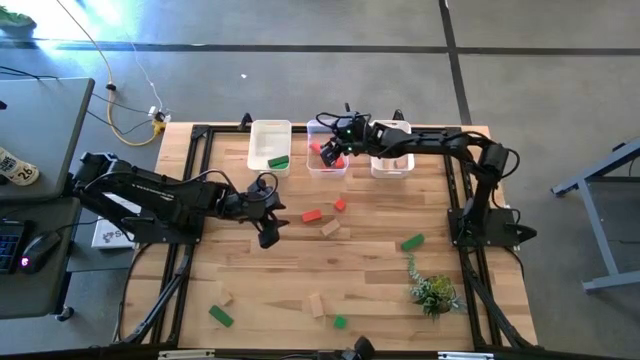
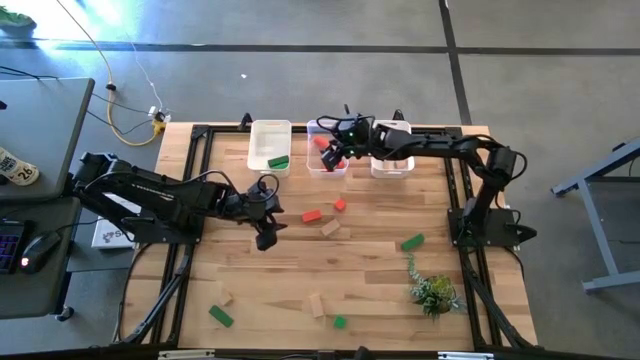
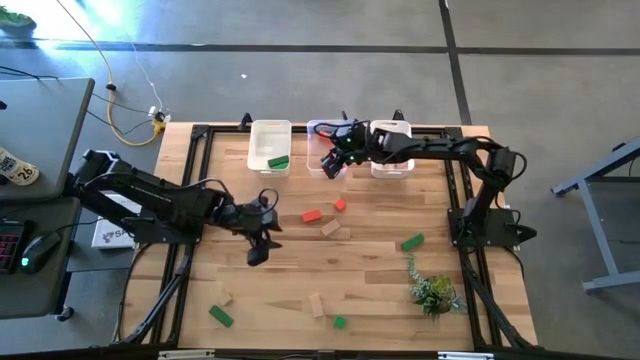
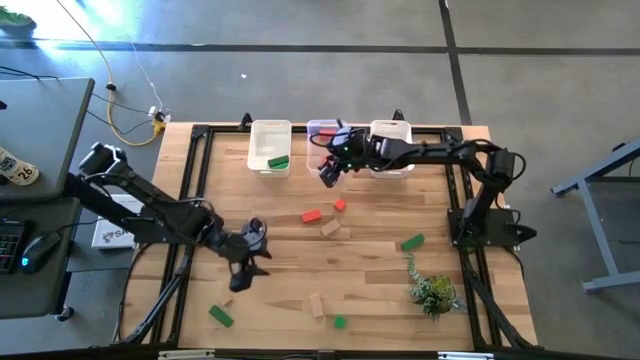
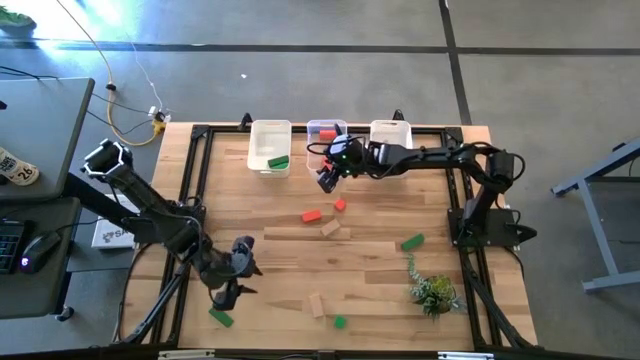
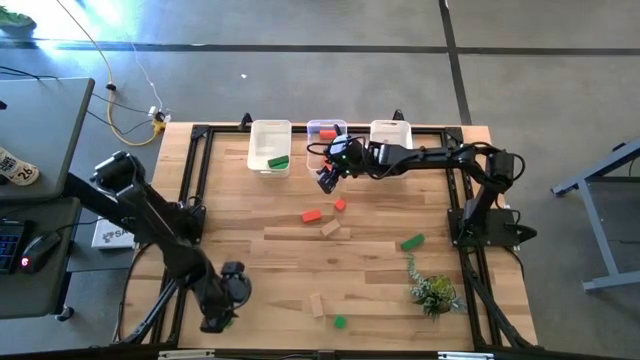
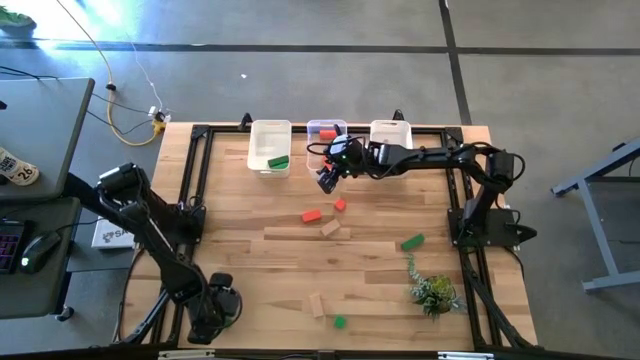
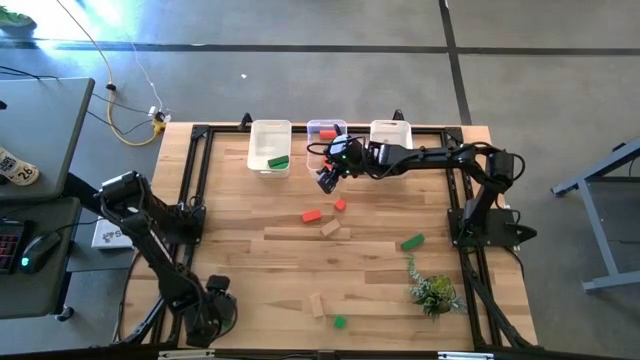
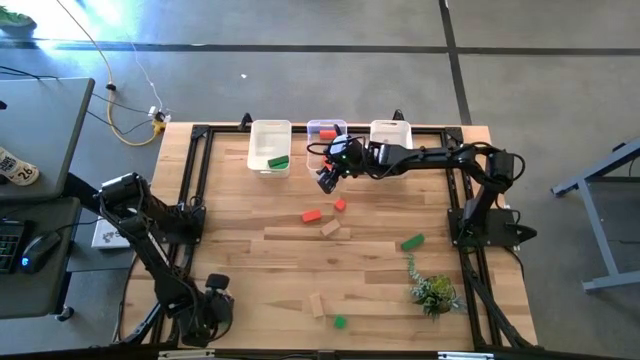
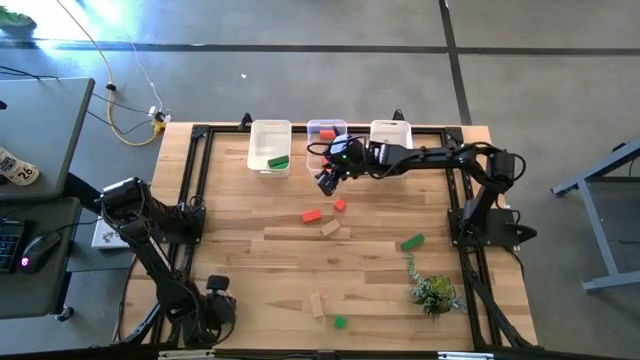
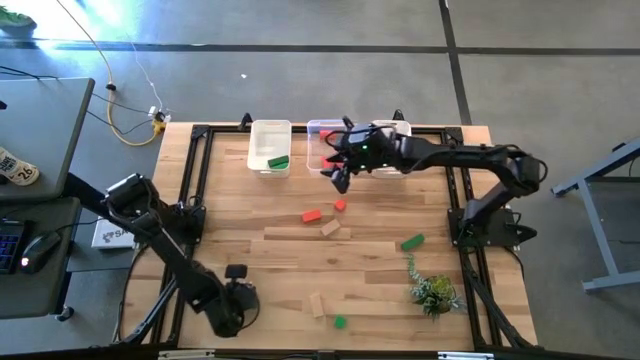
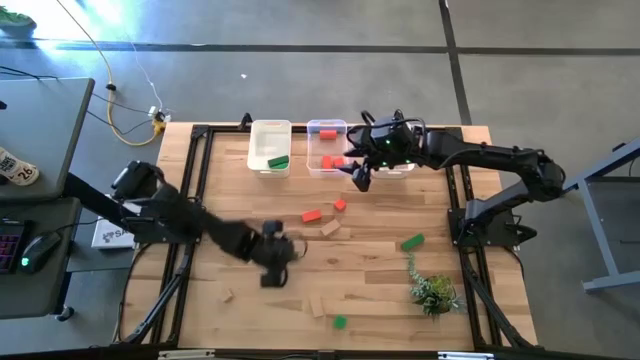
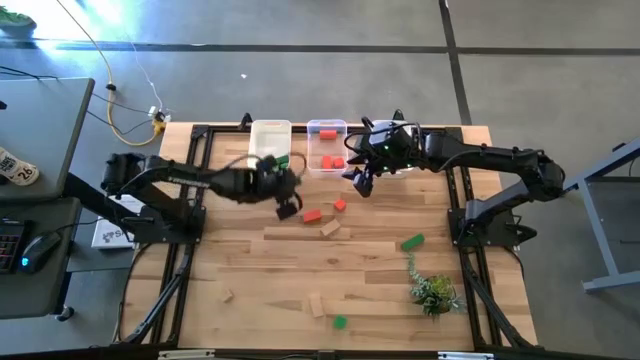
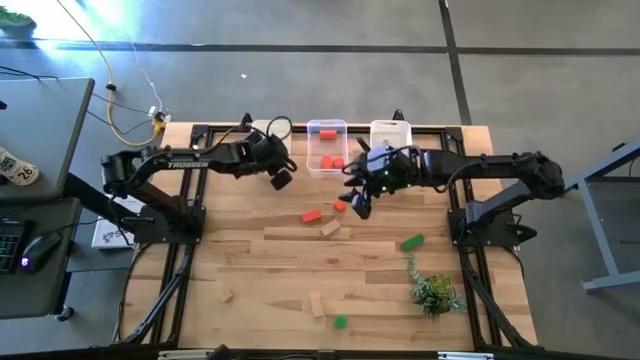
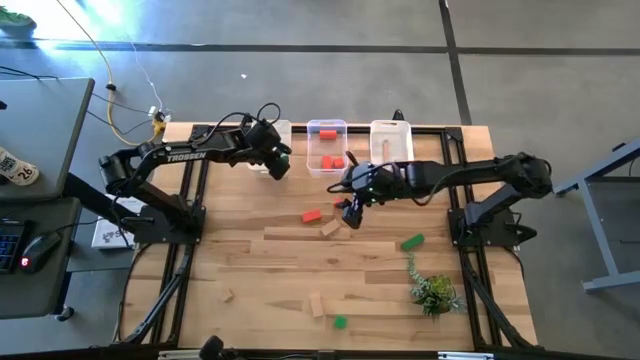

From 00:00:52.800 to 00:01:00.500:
Task: Sort & place blocks by color
Put the green block into the left white bin

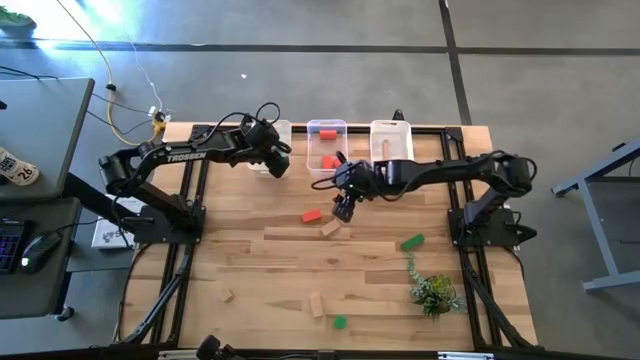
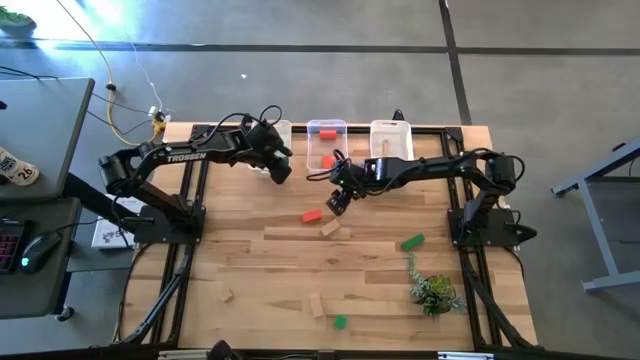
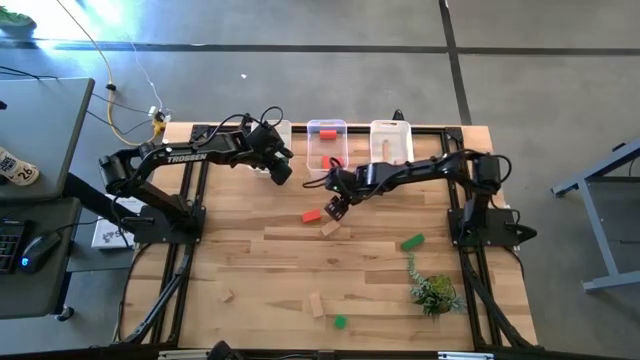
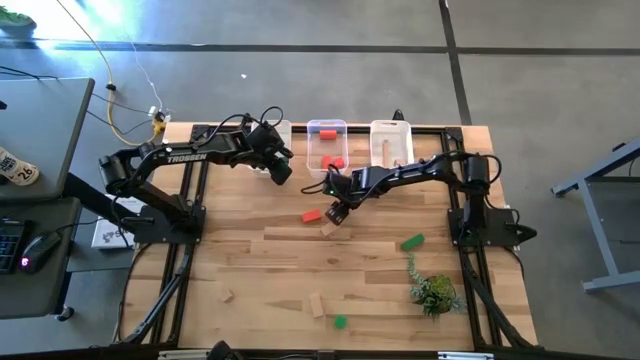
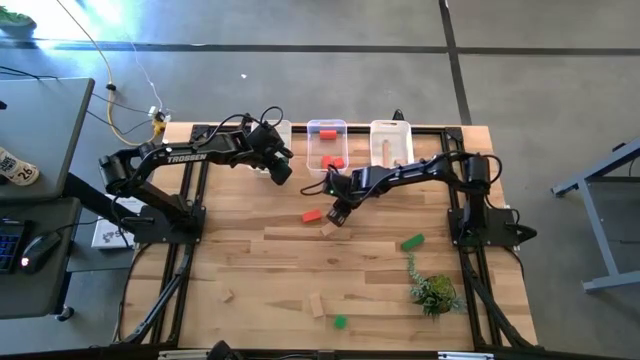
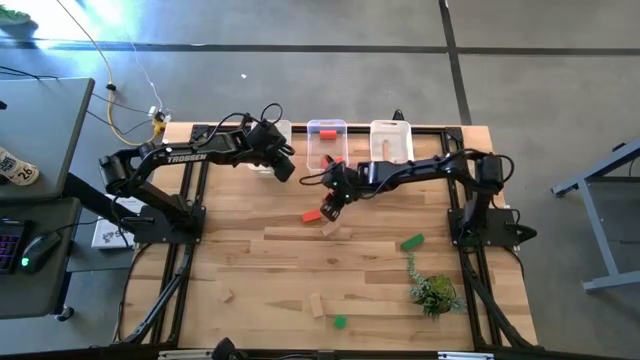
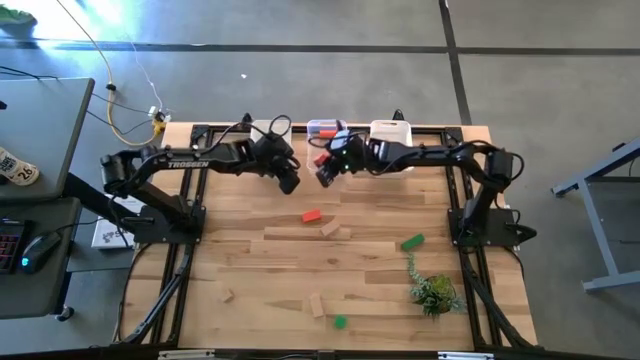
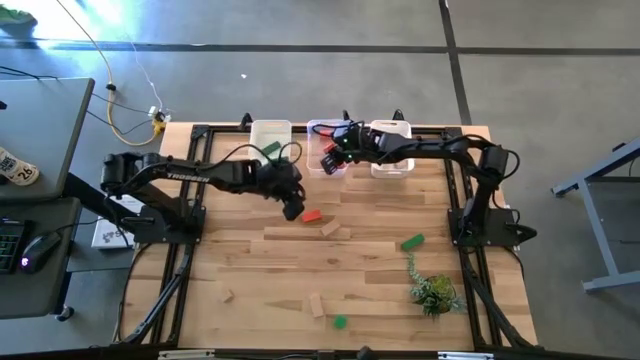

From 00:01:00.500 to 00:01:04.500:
Put the orange block into the transparent bin

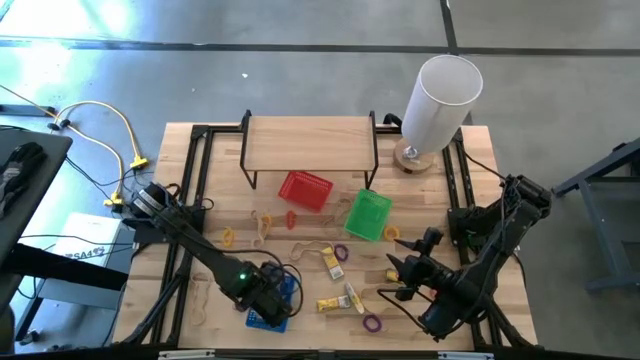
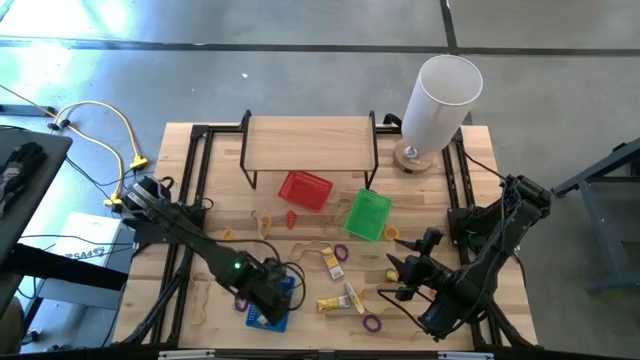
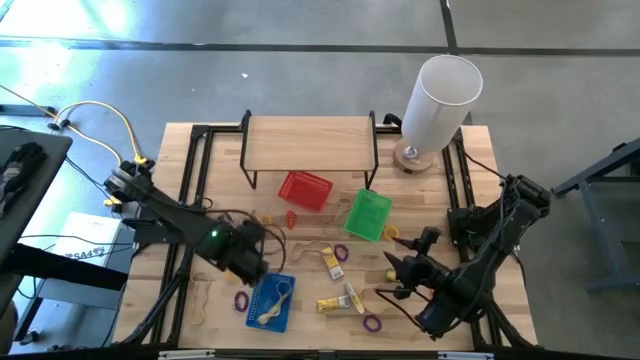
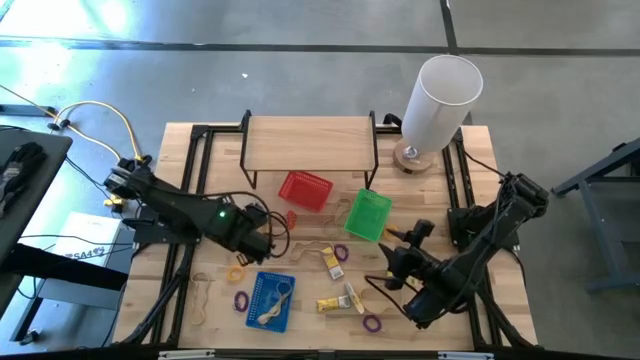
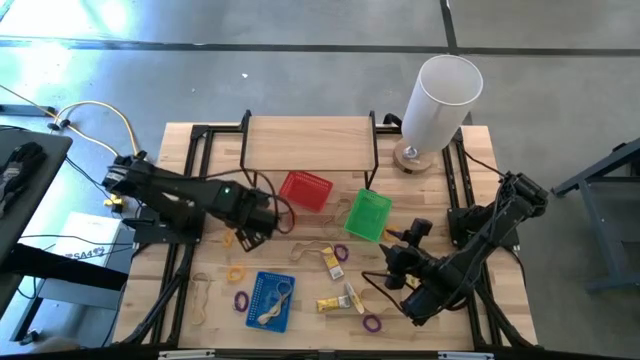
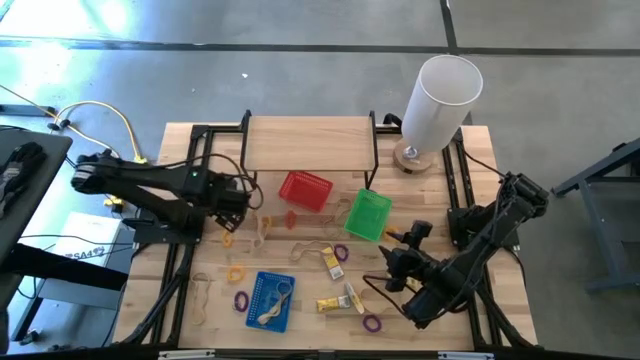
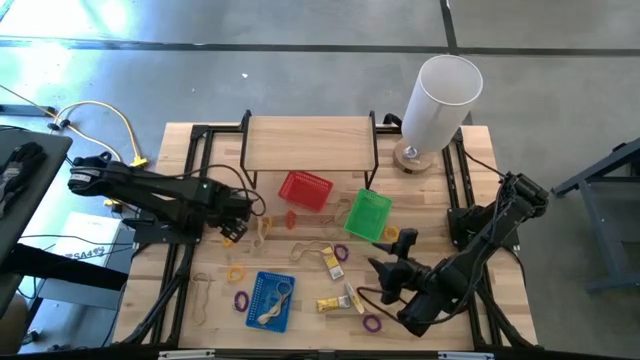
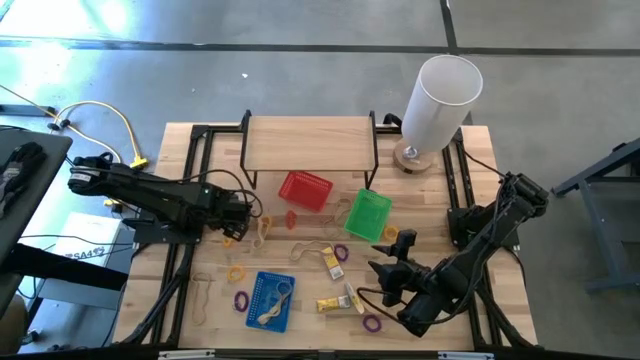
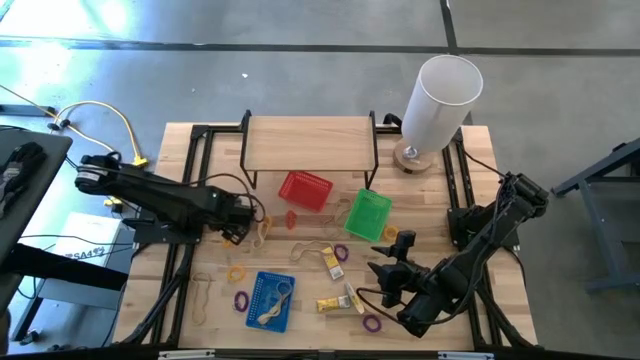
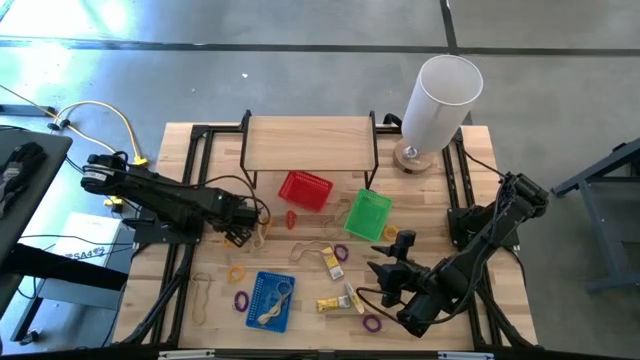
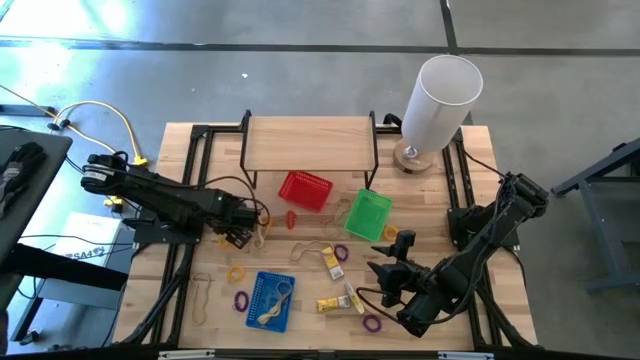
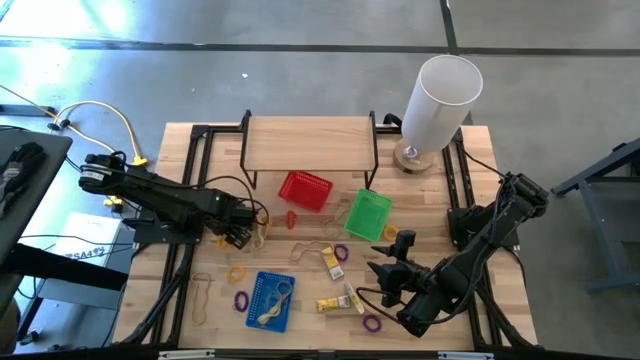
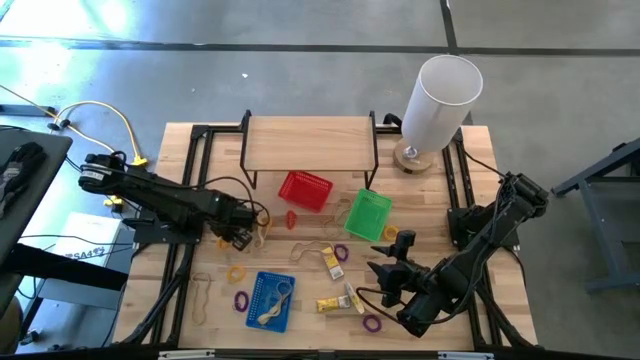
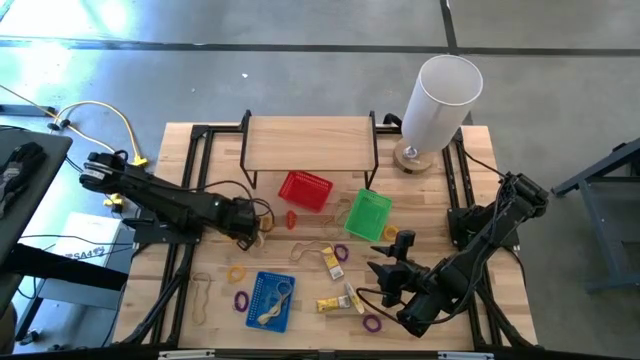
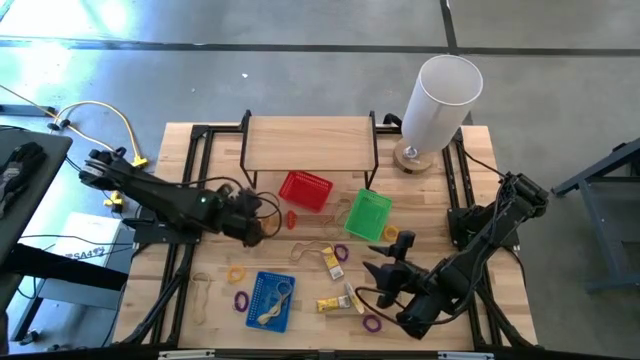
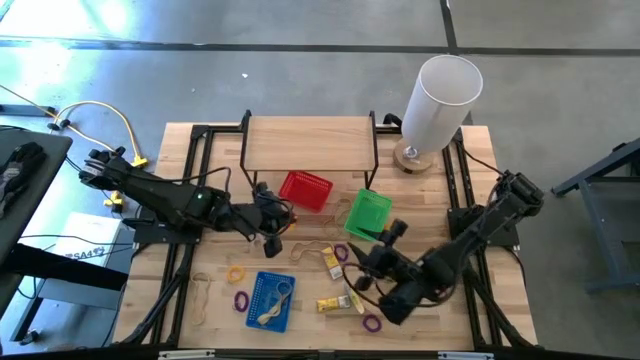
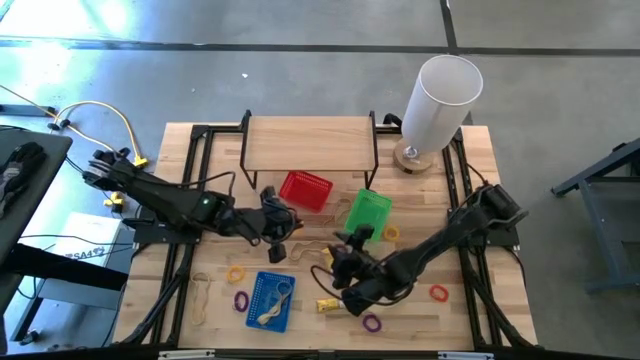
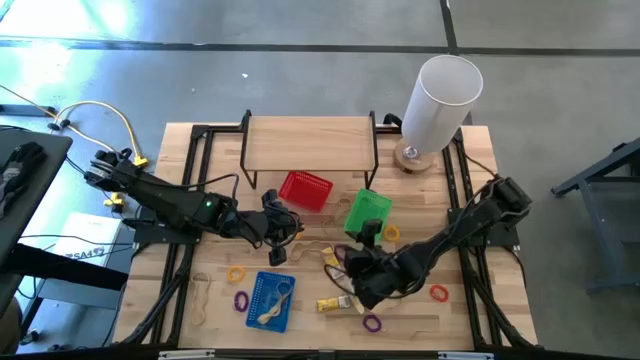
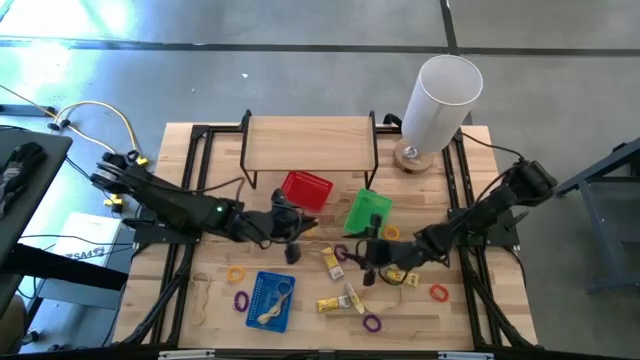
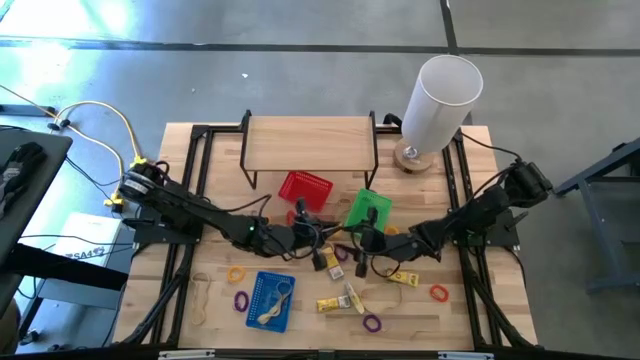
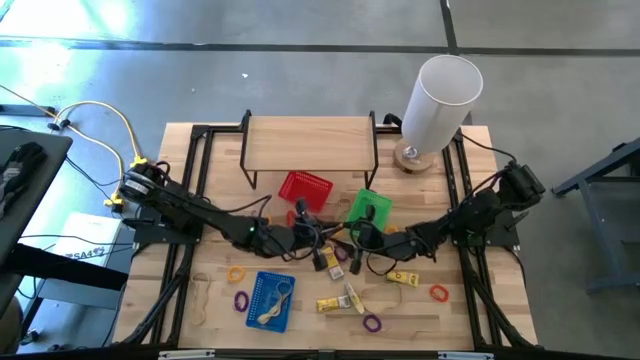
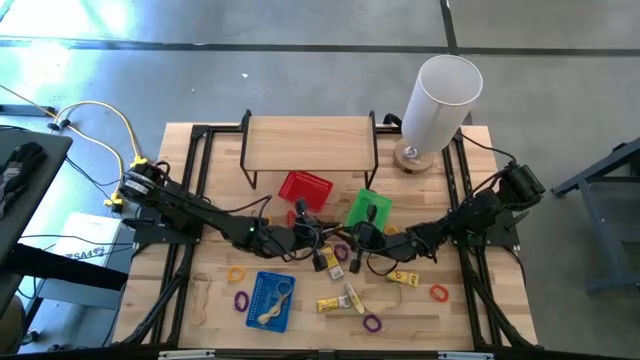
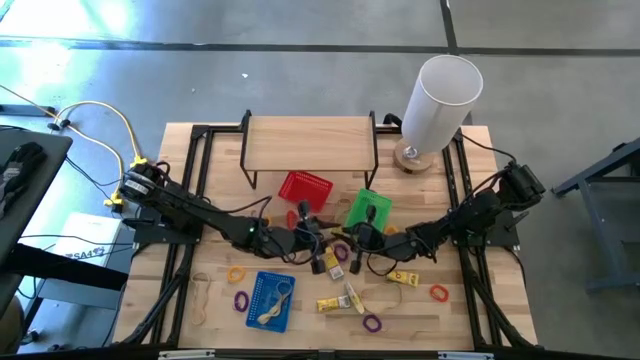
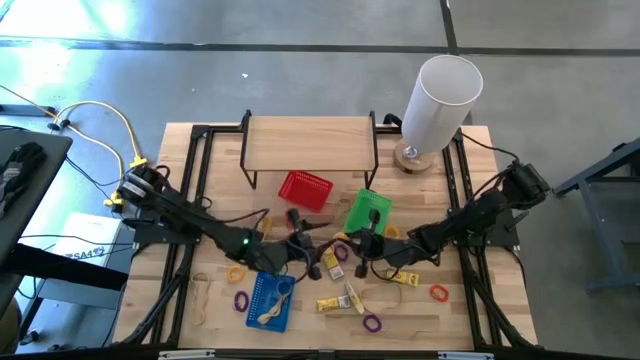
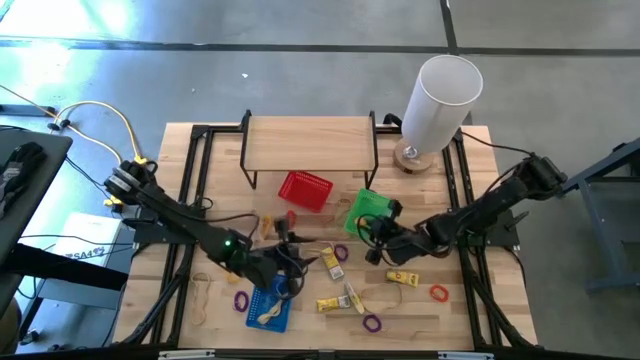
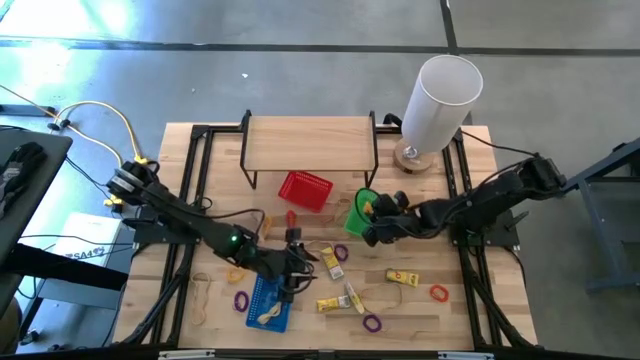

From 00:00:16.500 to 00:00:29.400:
Task: Pick & Place Office Desk Supplies
Put the yellow spring keychain into the green bin
